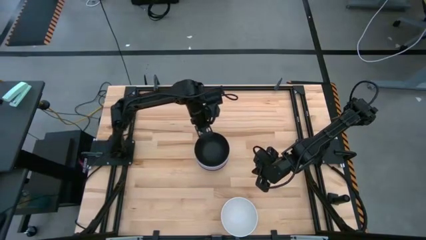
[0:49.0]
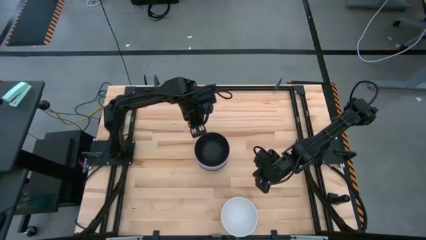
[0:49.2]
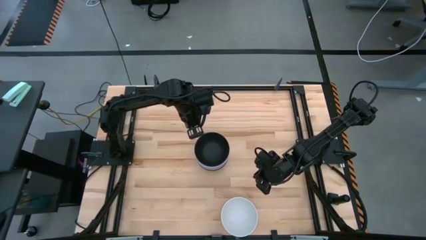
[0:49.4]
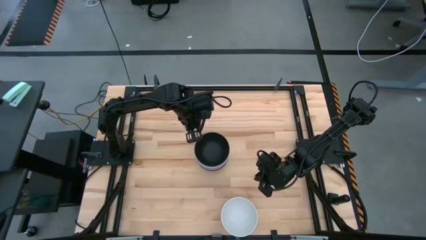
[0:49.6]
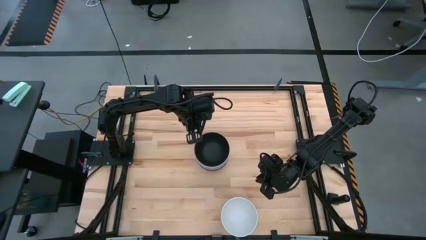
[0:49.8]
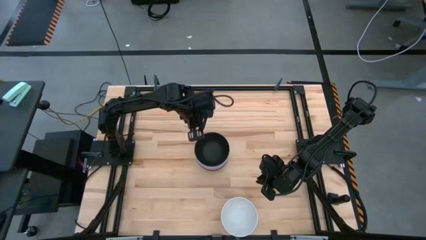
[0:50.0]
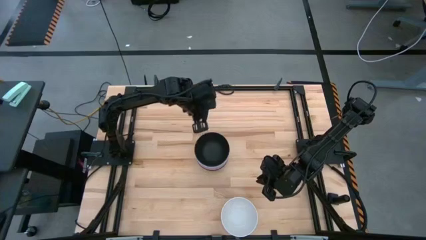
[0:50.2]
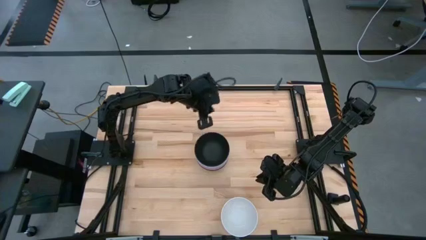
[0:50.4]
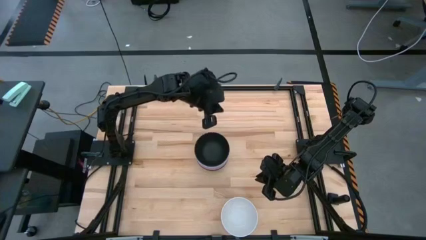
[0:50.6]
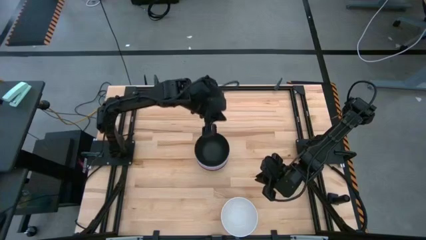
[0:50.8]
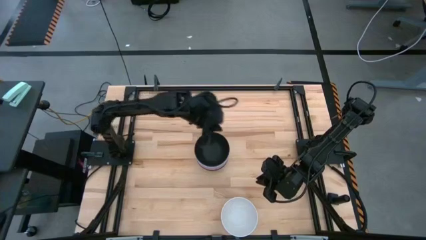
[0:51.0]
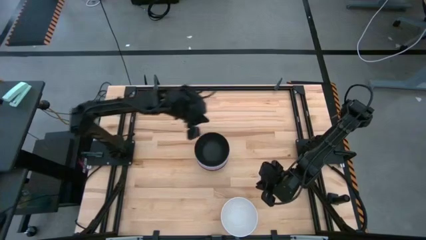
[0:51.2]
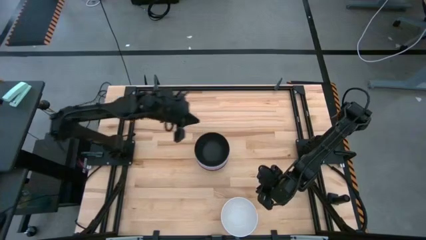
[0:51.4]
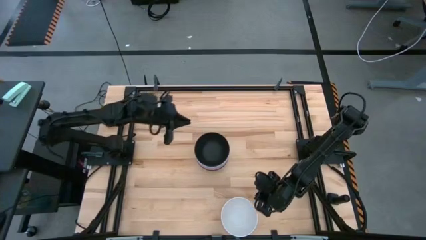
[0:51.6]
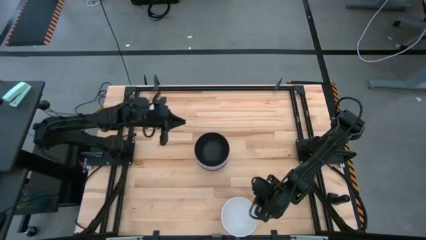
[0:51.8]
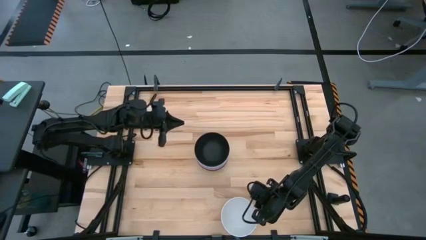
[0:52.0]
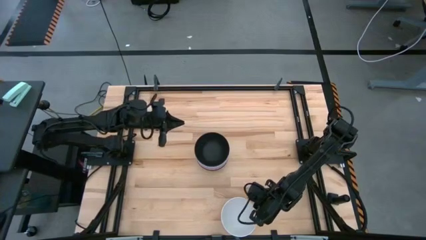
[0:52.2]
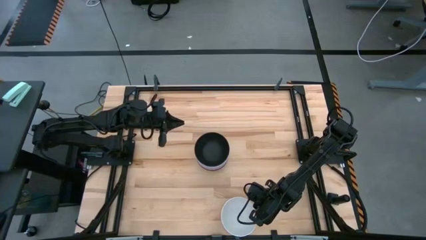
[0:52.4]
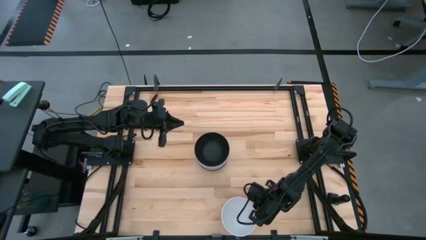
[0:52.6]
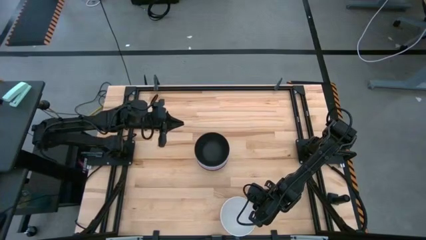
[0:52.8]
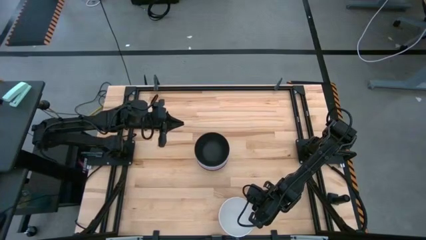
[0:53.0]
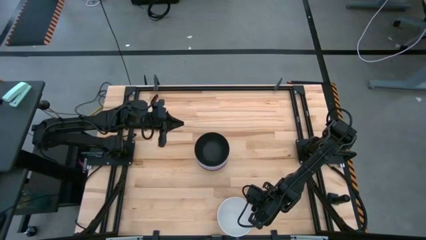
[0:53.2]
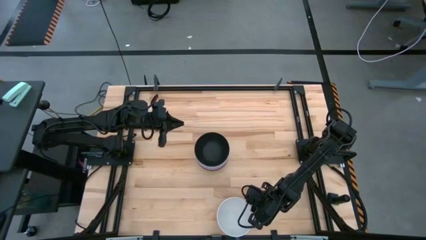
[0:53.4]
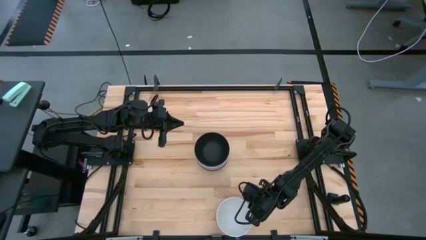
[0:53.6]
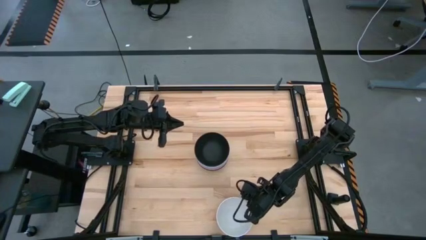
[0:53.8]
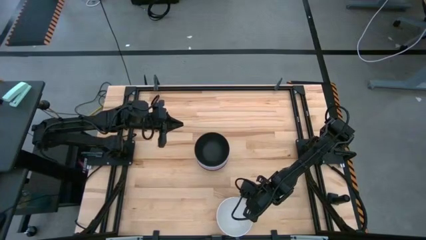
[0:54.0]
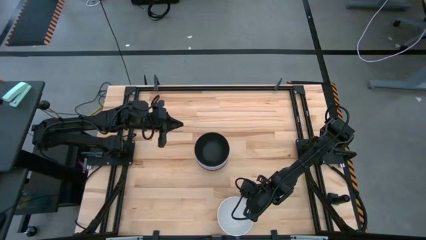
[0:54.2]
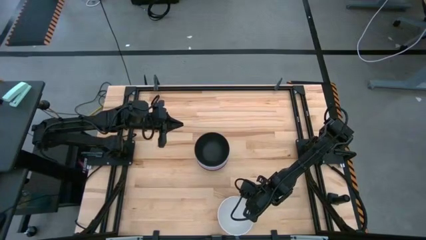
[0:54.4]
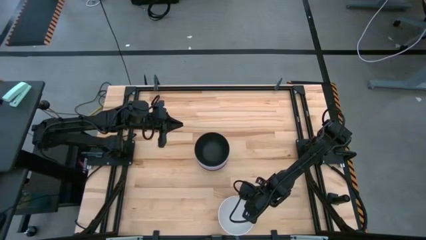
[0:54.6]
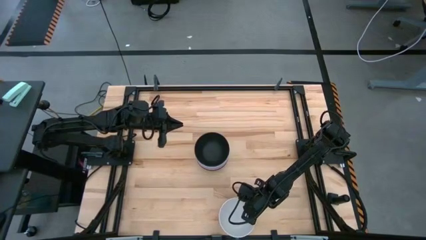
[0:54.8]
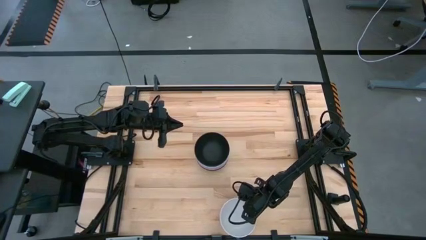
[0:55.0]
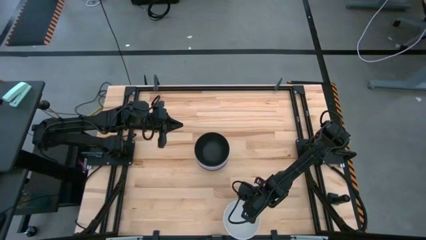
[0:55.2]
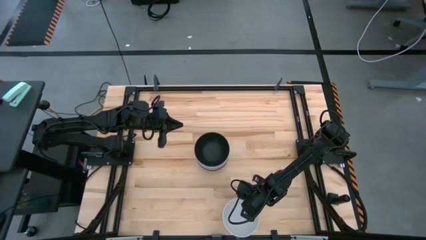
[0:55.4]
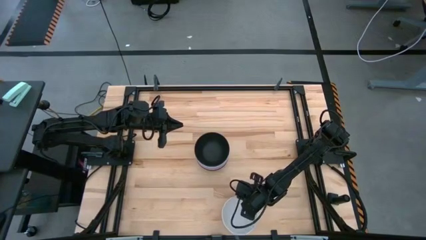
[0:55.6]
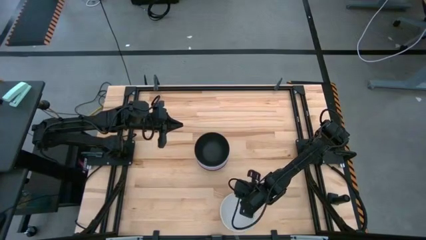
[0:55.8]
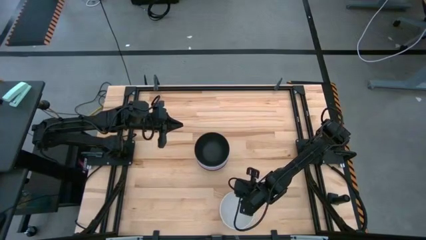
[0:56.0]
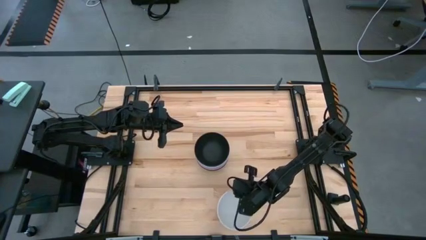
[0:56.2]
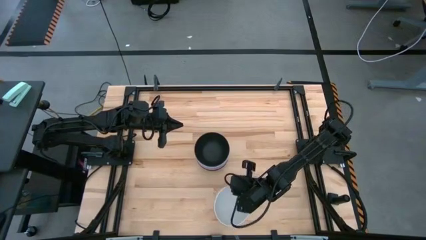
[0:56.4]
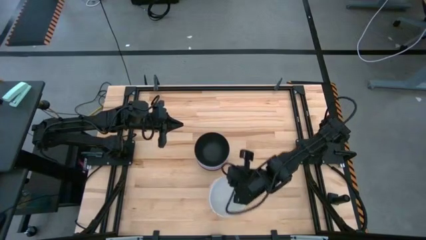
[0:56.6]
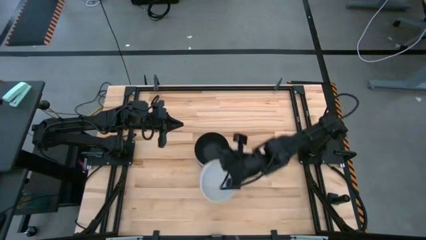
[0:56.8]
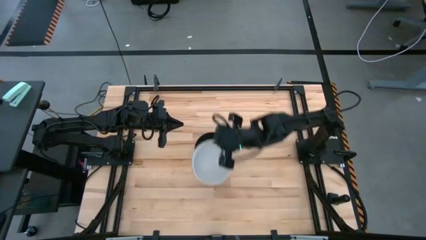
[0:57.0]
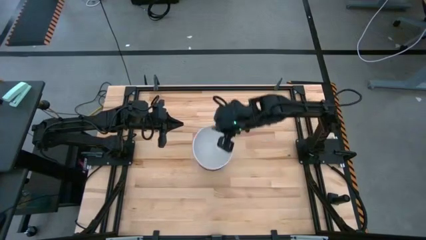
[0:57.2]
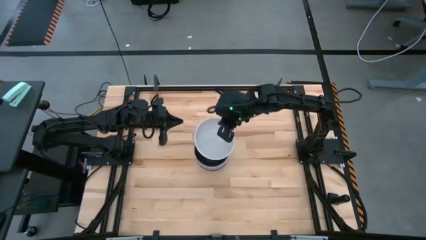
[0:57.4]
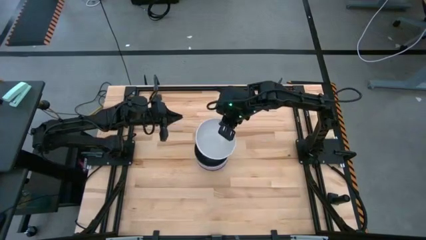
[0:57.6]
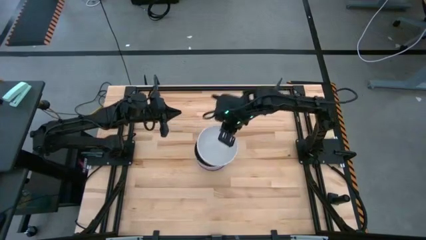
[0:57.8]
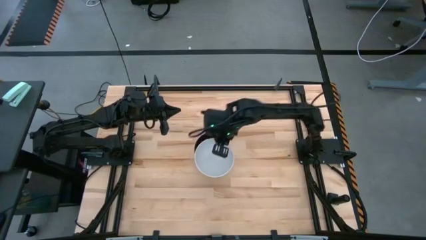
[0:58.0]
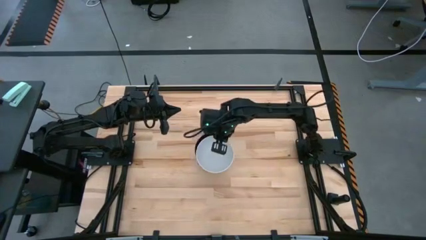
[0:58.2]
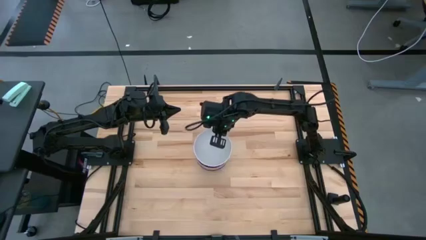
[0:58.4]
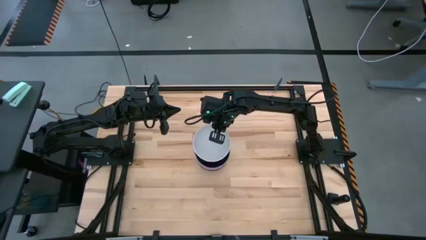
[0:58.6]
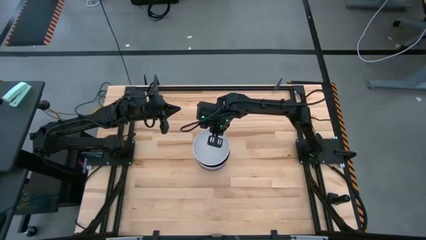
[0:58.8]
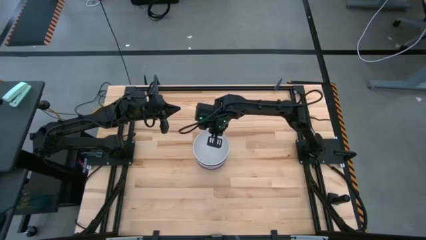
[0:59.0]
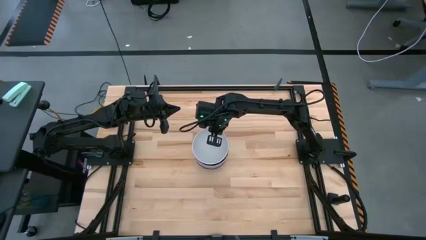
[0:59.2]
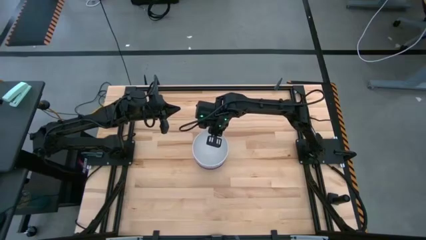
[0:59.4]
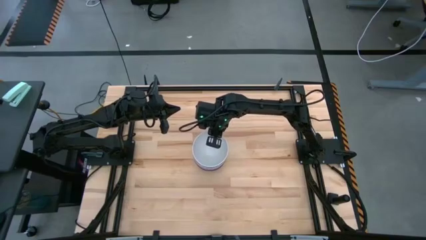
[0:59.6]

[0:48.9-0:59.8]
Task: Nest bowls inside each other
Stack the white bowl on top of the black bowl
